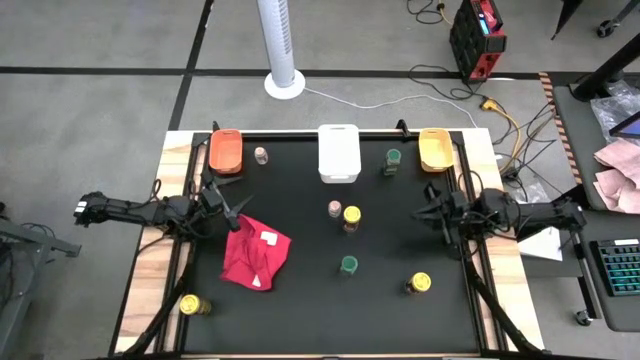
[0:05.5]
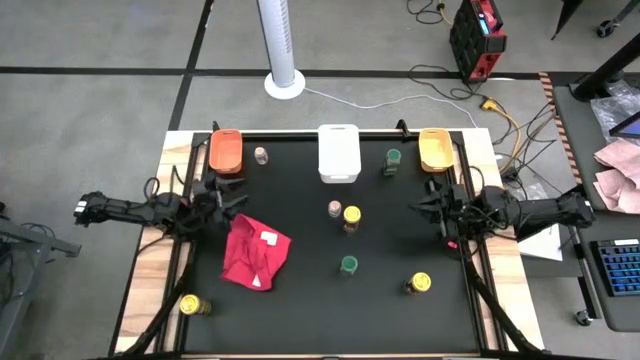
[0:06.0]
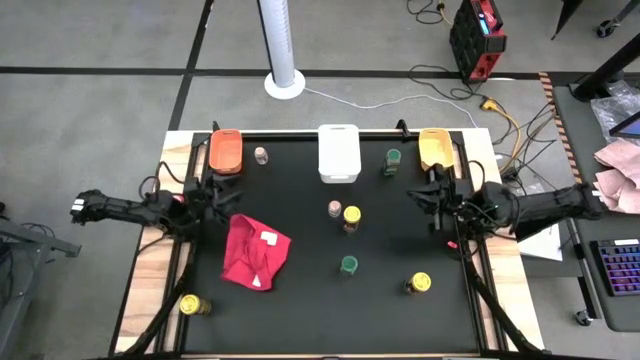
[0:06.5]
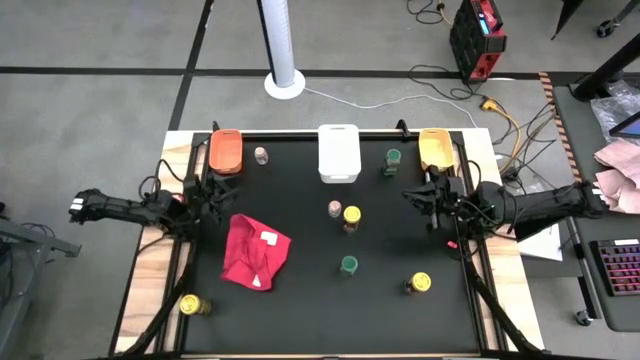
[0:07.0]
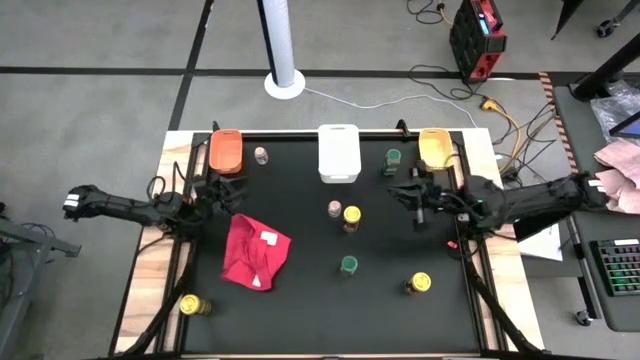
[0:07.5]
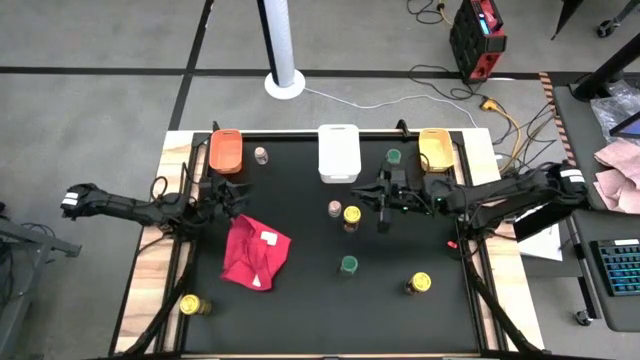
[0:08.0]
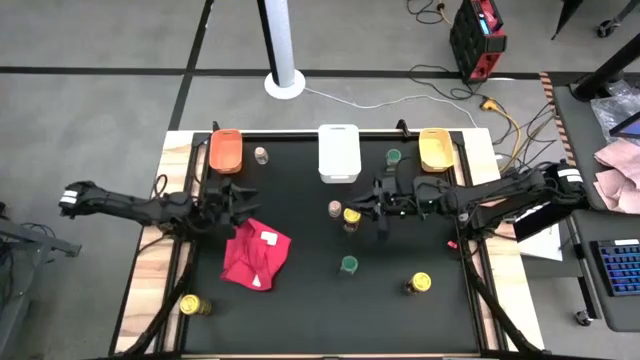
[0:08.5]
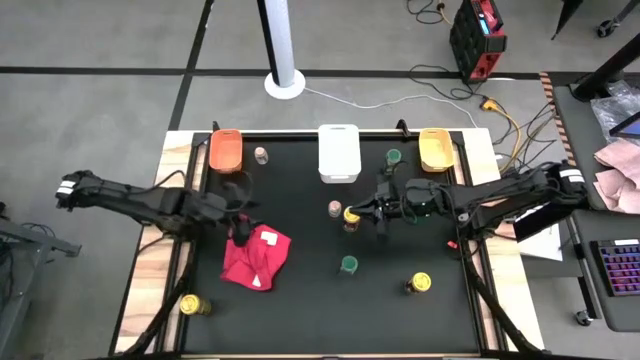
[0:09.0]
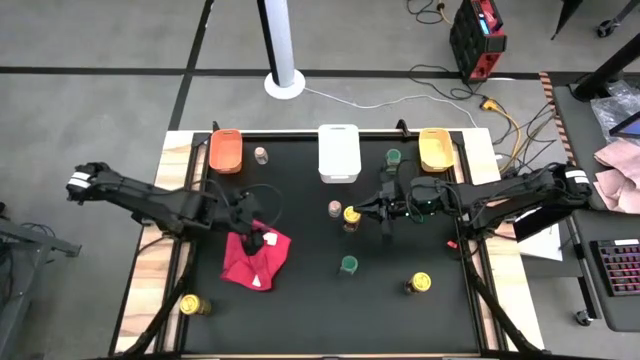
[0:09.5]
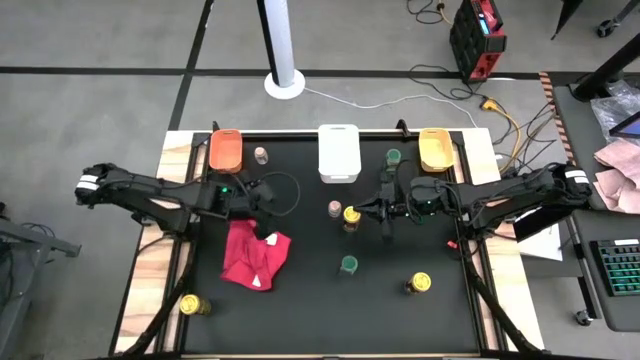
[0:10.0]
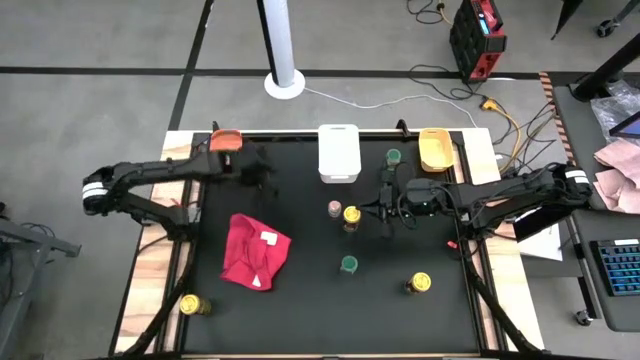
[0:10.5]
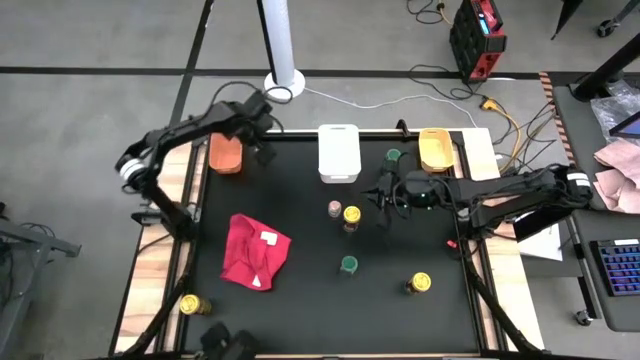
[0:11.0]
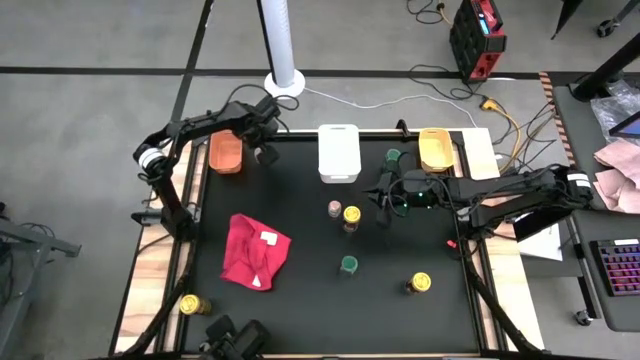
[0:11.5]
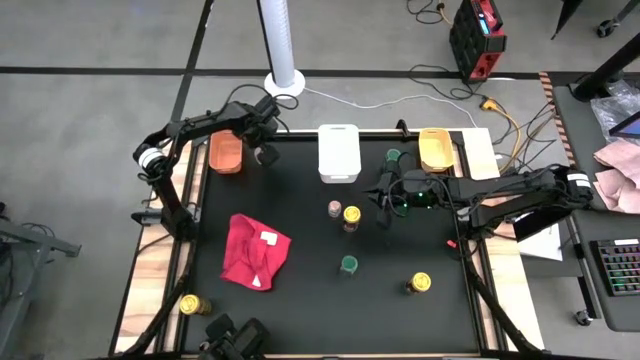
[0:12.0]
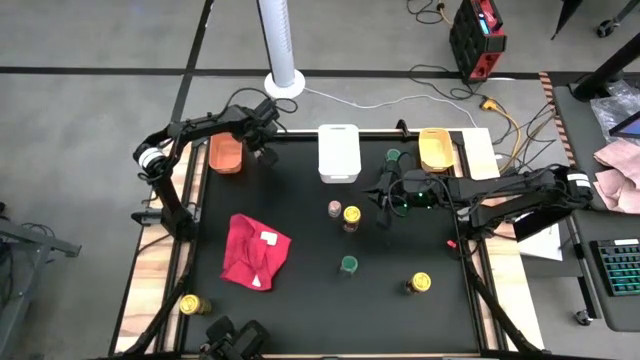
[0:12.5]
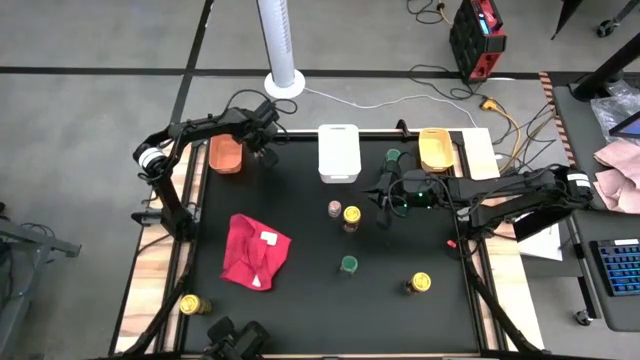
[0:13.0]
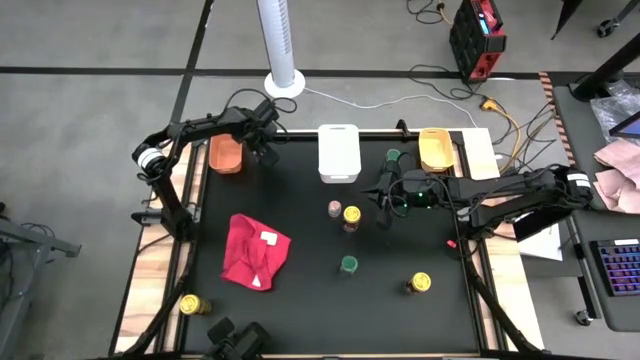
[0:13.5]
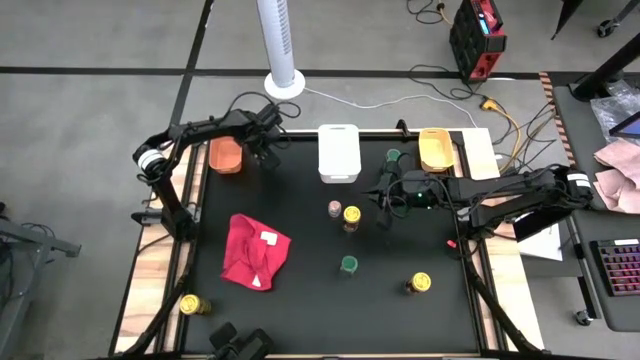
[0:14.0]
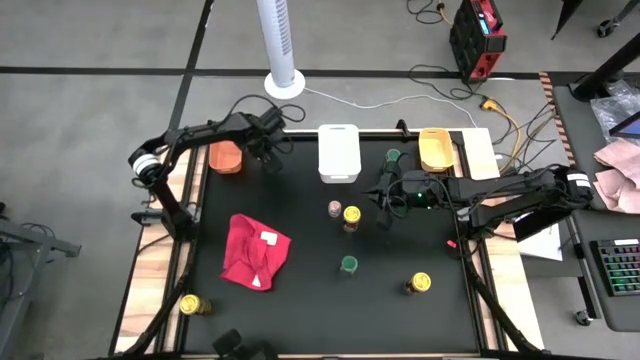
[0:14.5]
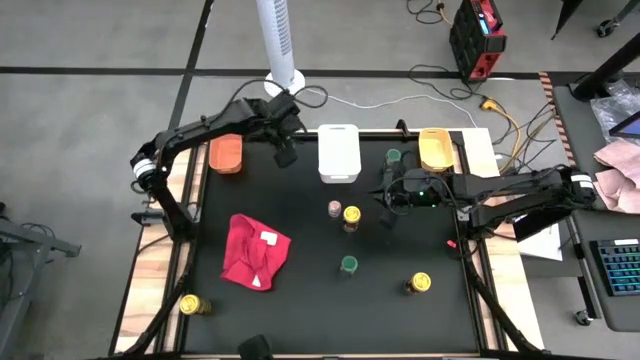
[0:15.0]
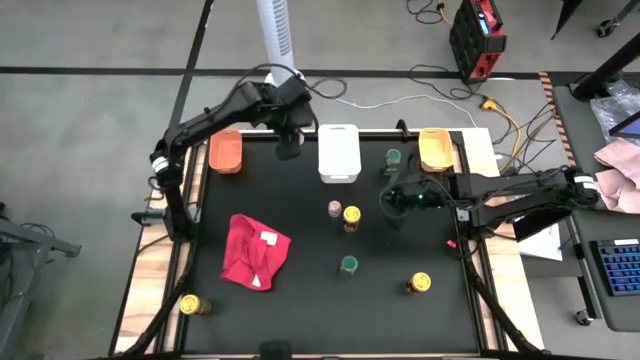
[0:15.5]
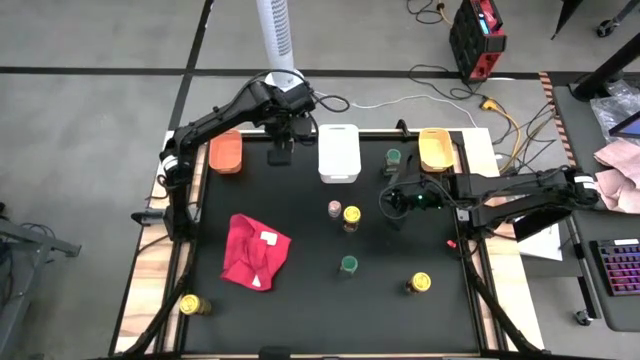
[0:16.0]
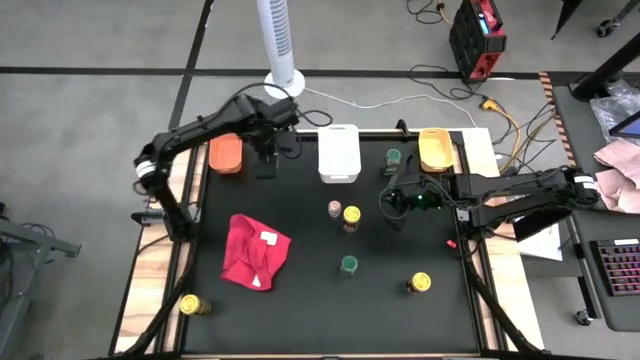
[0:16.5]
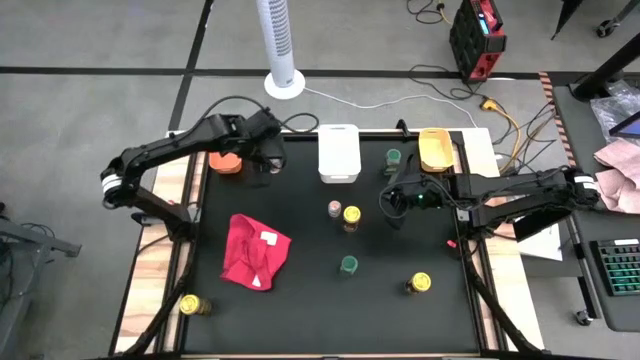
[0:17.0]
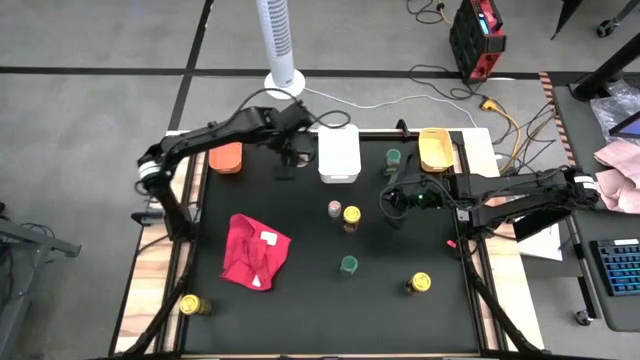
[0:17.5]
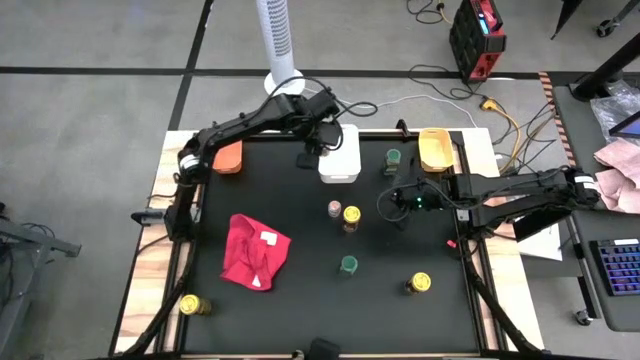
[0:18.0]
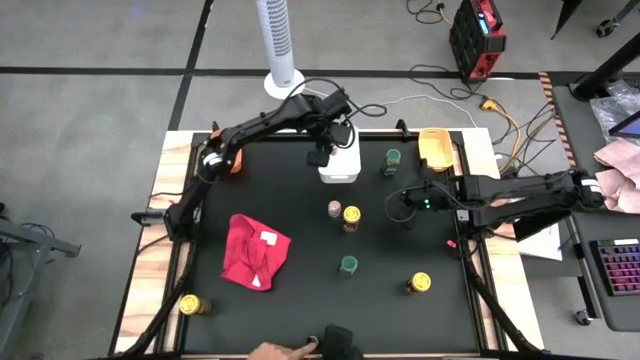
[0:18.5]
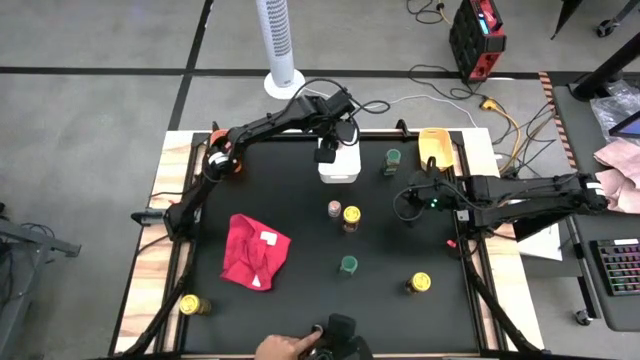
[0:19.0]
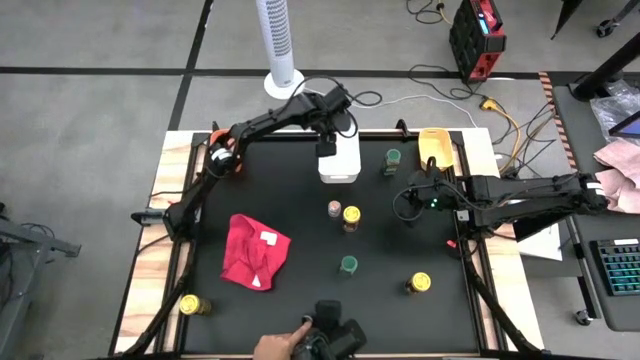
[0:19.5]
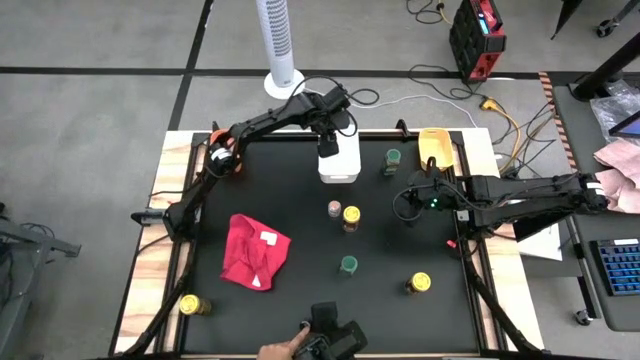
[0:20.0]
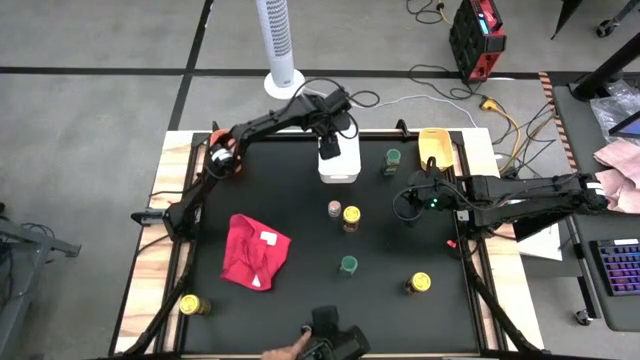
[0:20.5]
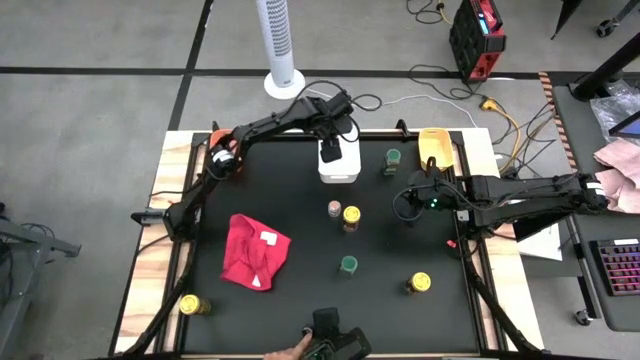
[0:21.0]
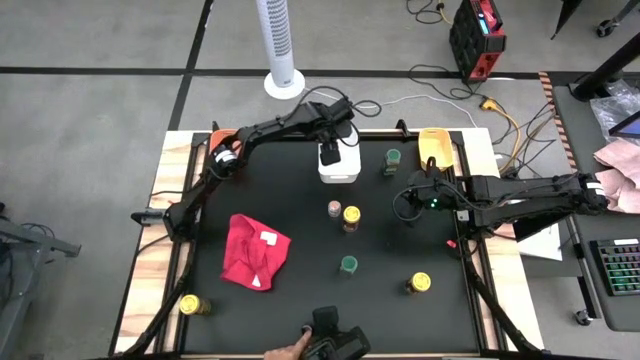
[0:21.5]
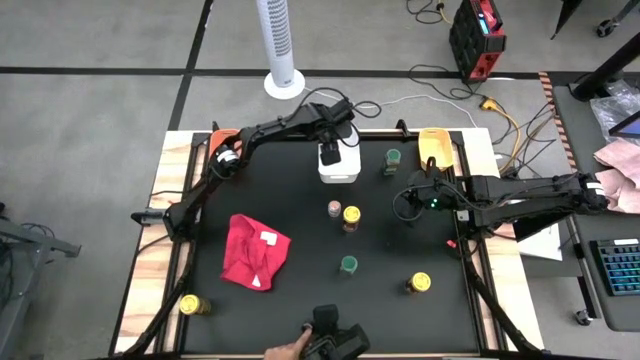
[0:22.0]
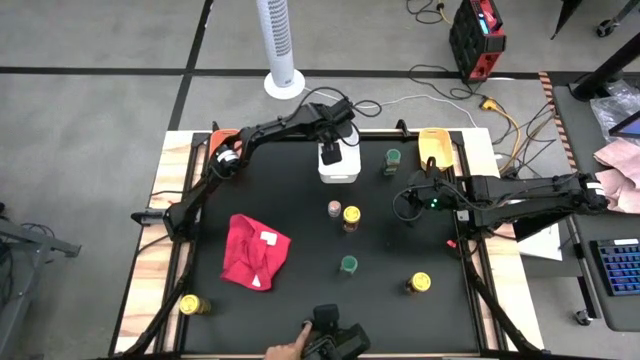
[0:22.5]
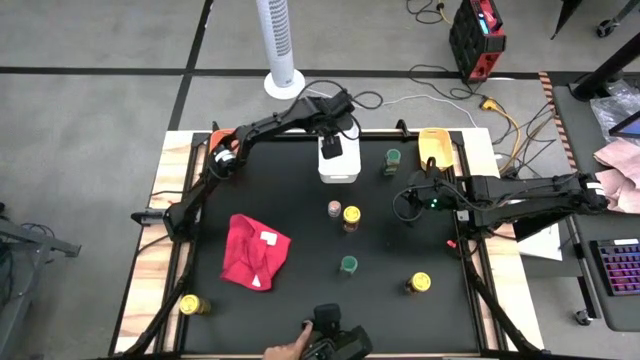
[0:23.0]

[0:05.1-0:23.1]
Task: Sort spices by type
Put the top brown seasoning bottle into the white bin
